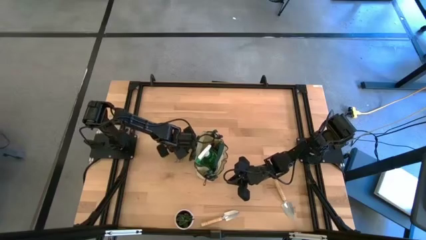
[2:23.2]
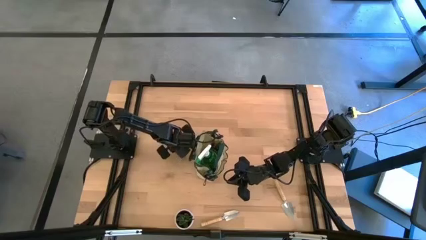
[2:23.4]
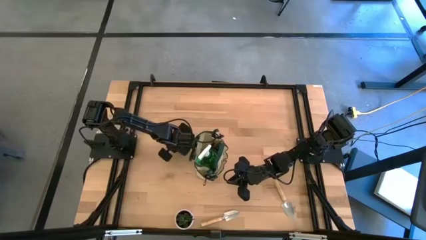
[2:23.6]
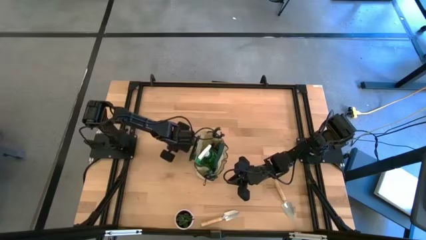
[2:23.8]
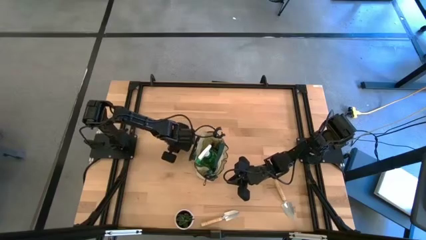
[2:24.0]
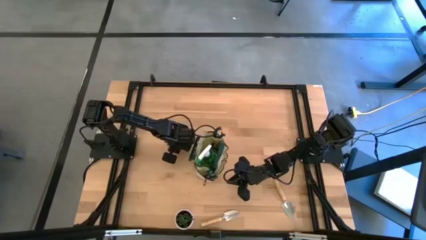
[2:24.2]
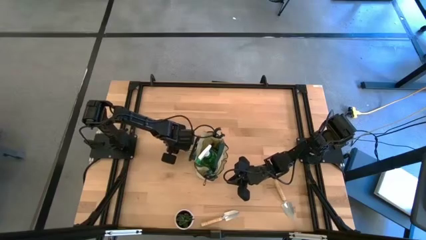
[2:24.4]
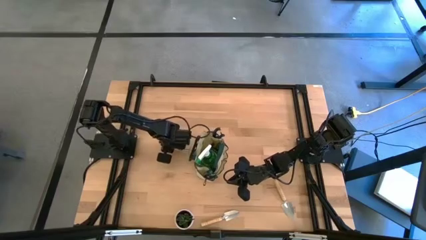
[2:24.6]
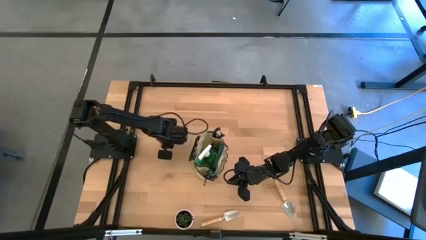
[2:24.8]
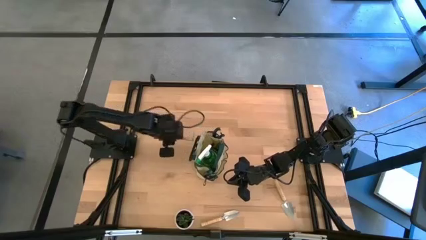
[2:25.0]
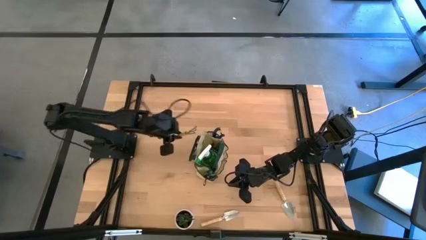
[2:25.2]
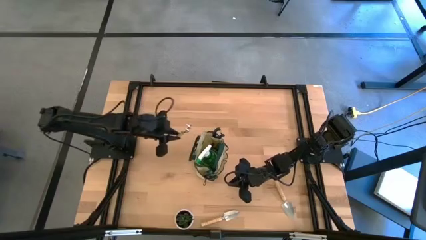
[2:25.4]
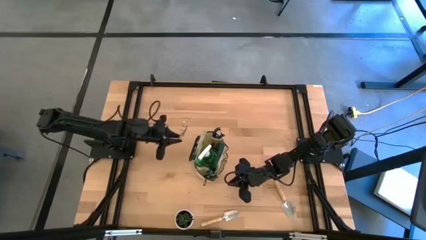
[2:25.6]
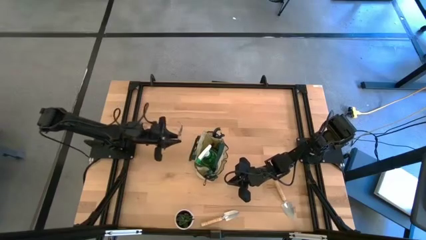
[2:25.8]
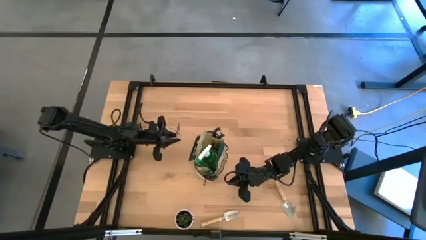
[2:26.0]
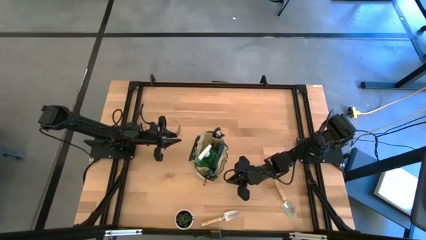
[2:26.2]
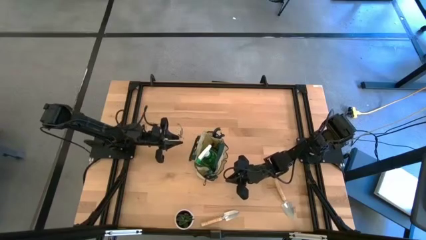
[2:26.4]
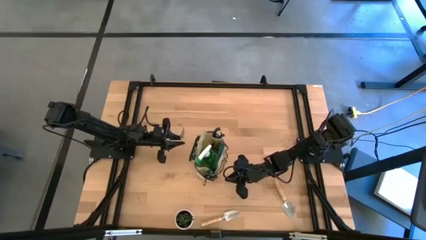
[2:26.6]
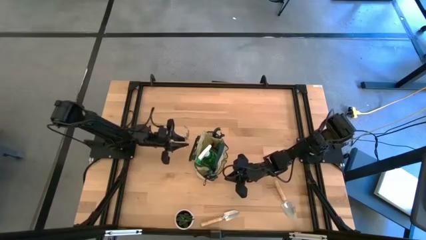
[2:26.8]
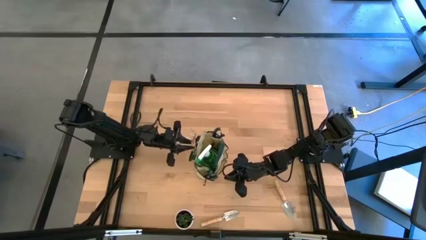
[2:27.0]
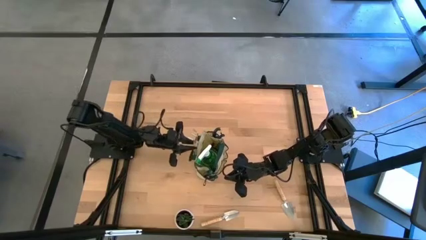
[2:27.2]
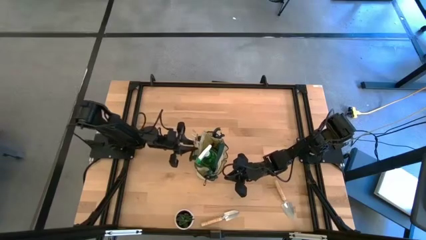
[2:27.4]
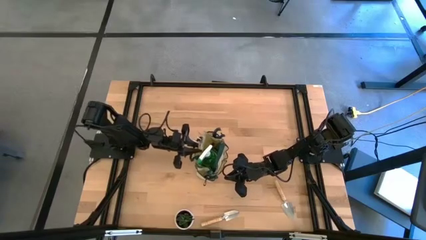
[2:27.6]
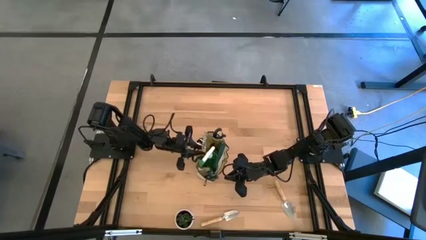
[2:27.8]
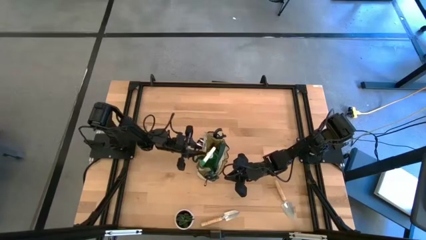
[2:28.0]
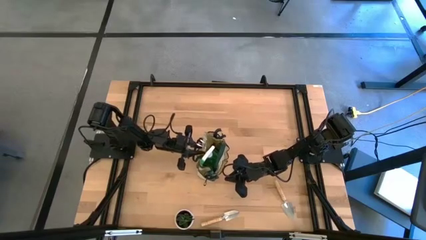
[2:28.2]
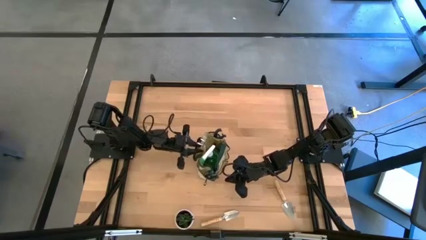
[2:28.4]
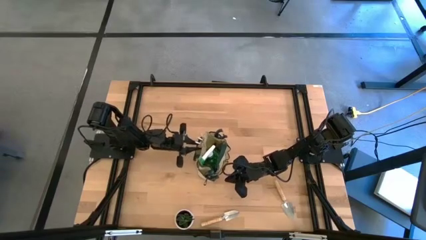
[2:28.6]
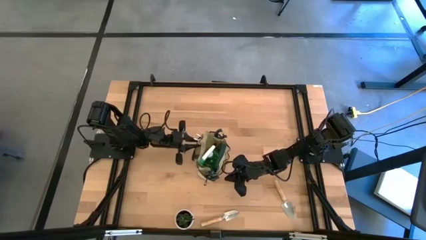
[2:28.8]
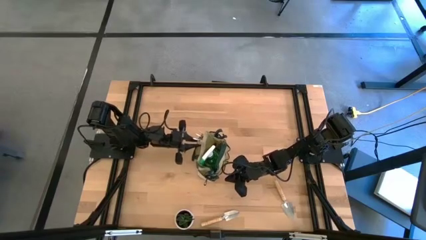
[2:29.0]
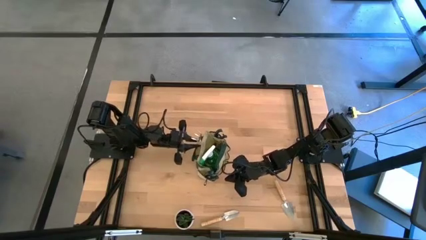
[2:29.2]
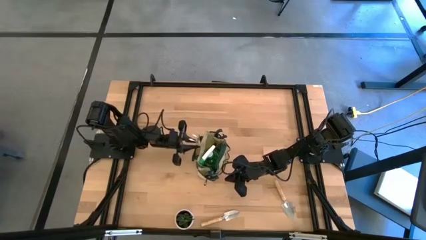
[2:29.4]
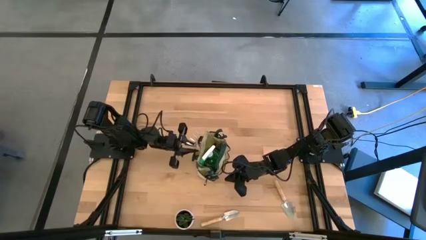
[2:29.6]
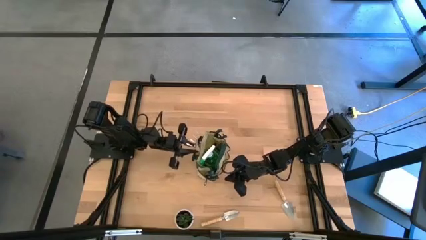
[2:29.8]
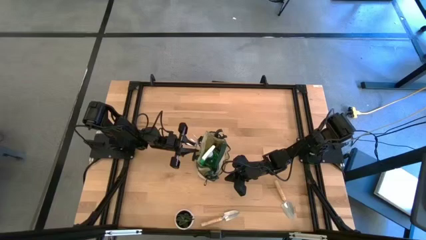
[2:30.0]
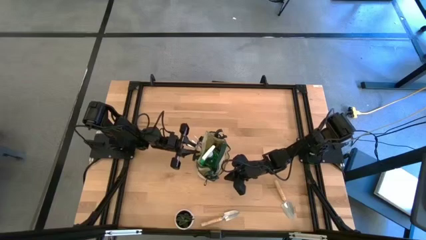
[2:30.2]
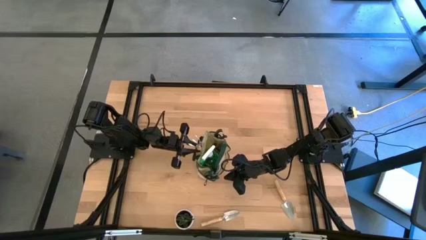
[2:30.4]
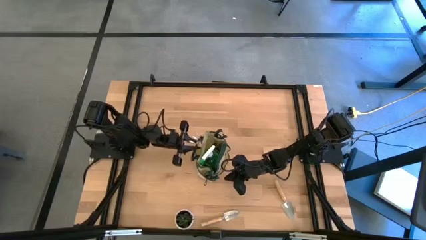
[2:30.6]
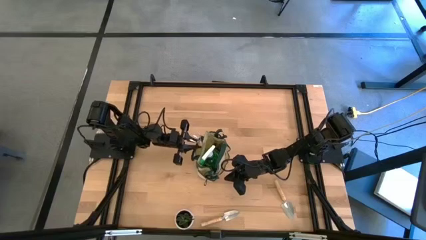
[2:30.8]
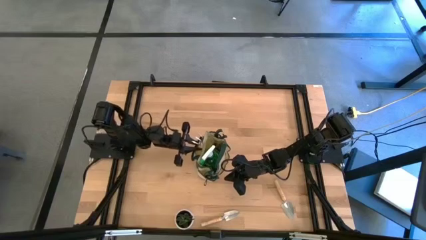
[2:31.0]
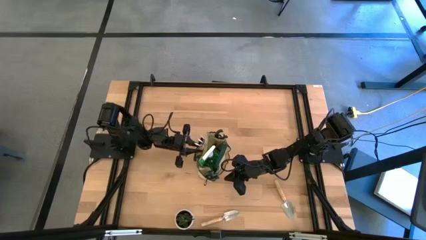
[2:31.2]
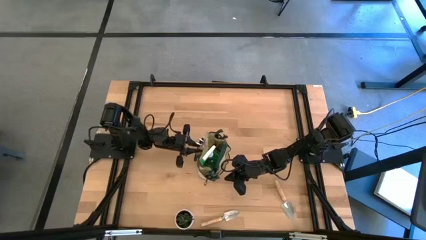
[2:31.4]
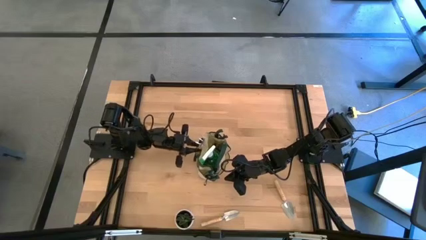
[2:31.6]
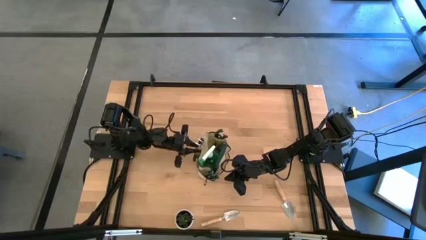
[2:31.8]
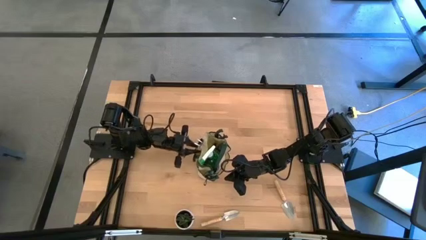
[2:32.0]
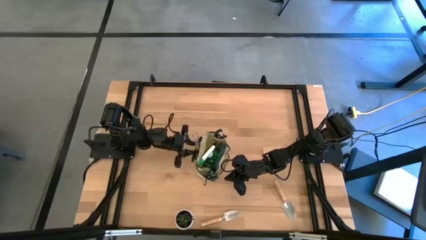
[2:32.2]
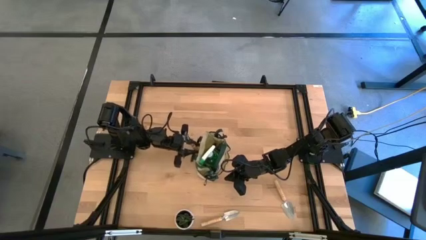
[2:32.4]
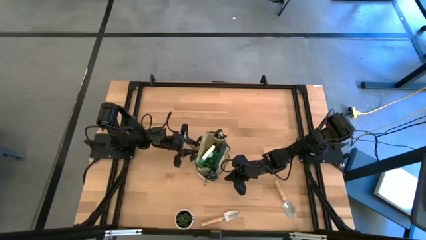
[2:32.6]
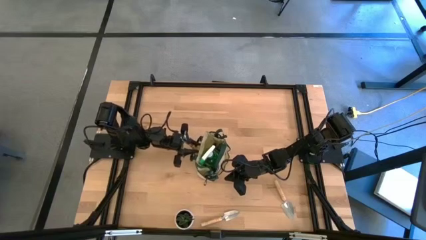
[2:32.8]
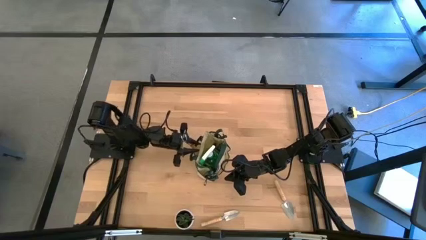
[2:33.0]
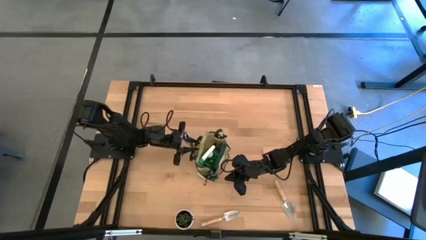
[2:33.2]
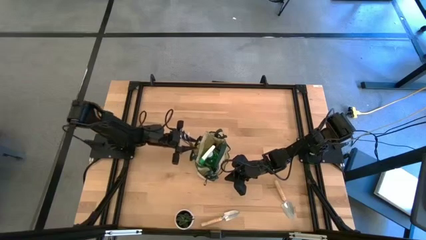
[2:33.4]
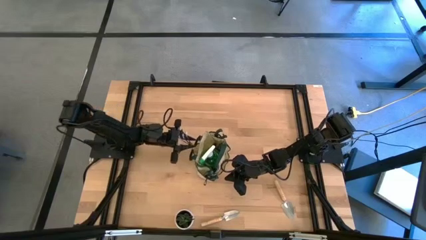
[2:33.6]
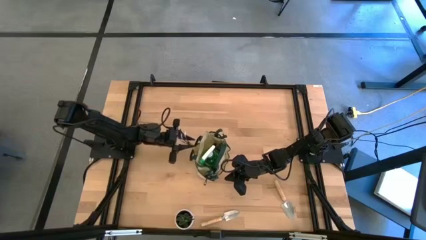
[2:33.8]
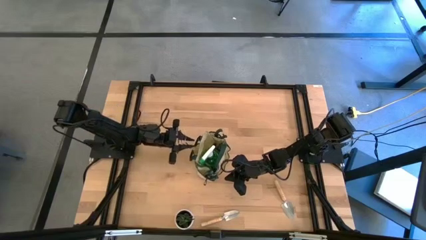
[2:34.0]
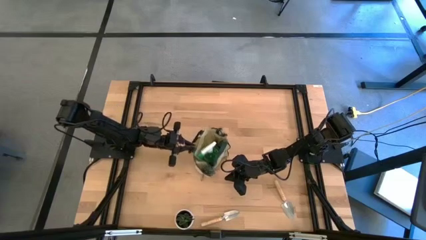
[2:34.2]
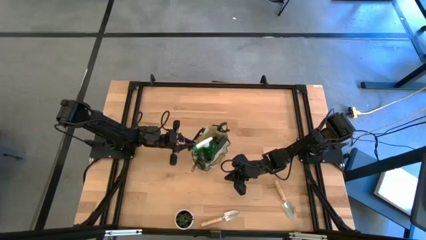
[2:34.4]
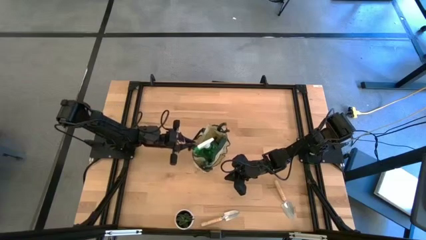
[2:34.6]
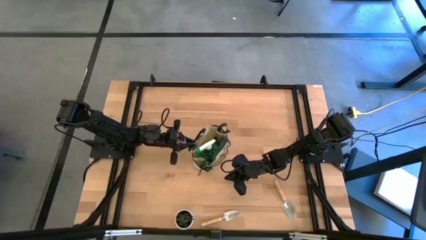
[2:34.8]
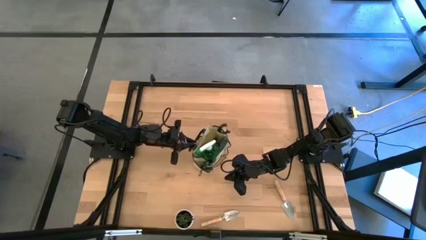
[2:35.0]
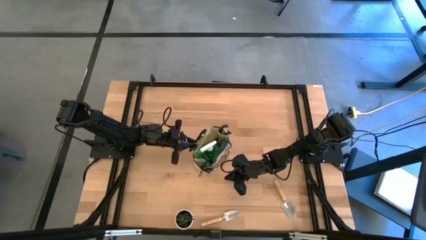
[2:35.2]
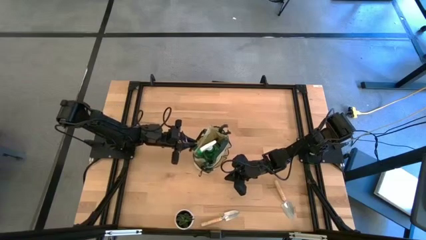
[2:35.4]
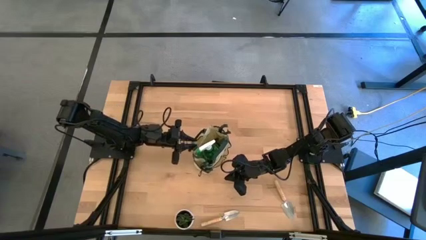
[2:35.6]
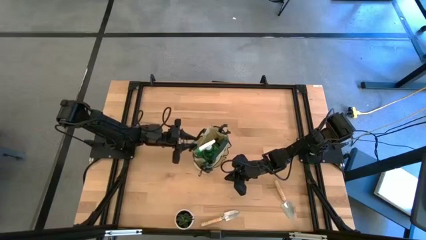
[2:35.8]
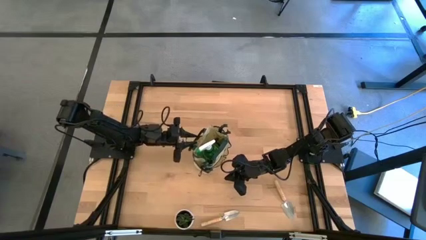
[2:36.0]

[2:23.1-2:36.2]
Task: Pick & Place Garden tools in Gardening bag
Put the brown hand rake into the side pocket of the green gardening bag

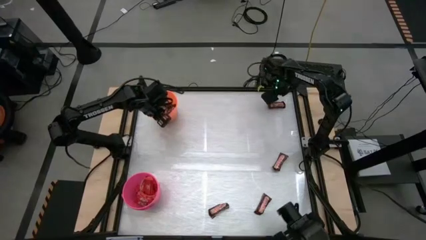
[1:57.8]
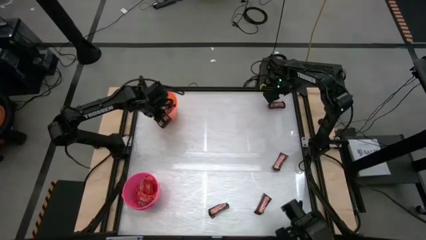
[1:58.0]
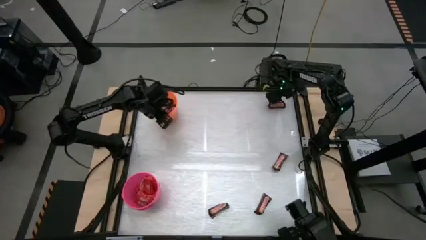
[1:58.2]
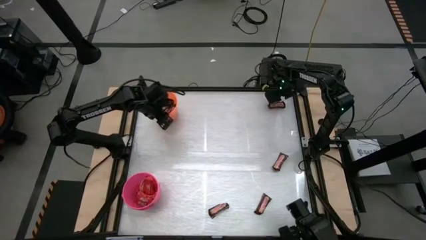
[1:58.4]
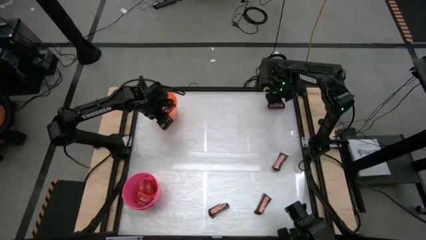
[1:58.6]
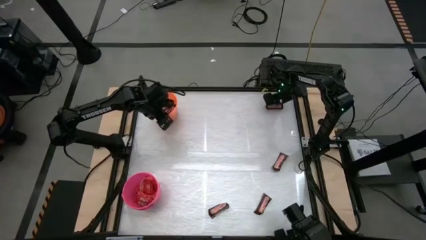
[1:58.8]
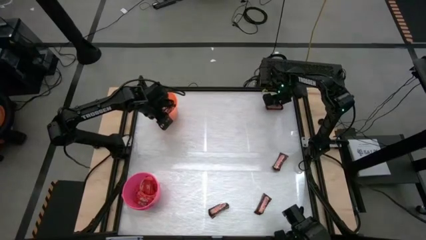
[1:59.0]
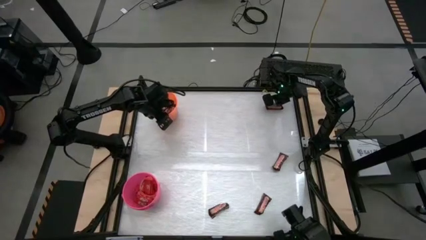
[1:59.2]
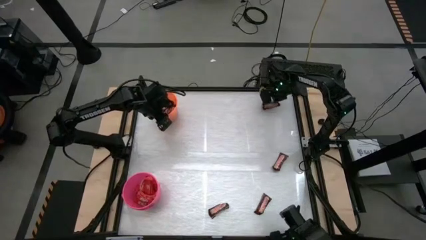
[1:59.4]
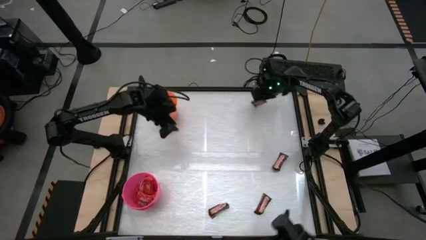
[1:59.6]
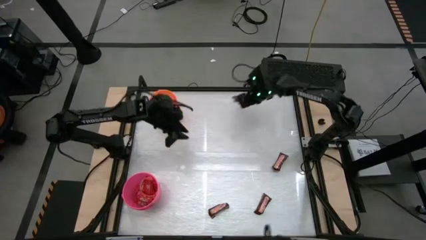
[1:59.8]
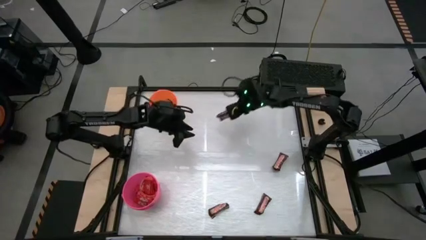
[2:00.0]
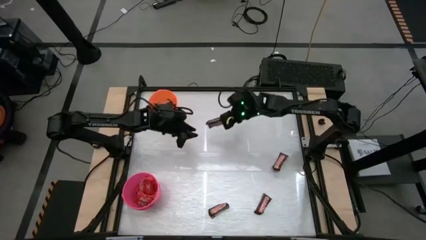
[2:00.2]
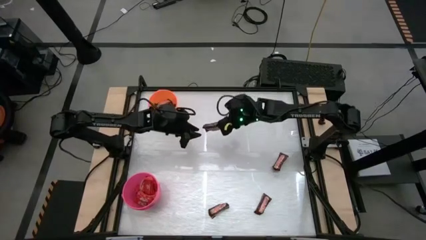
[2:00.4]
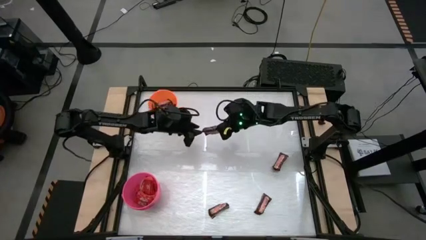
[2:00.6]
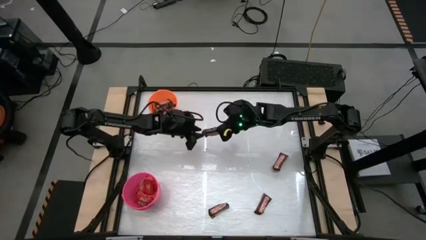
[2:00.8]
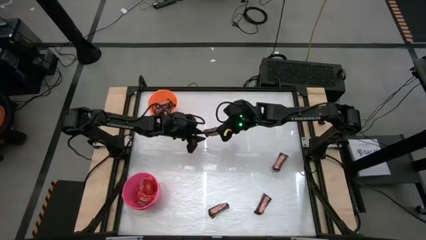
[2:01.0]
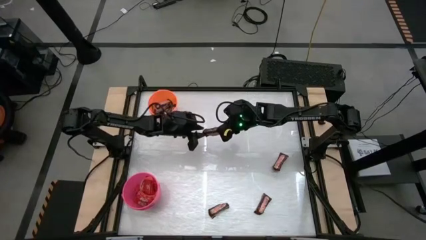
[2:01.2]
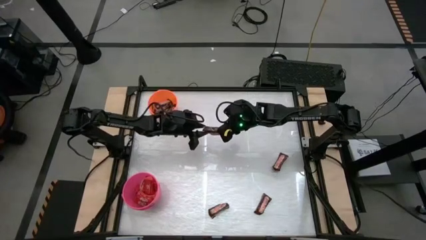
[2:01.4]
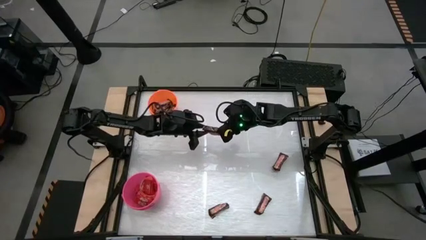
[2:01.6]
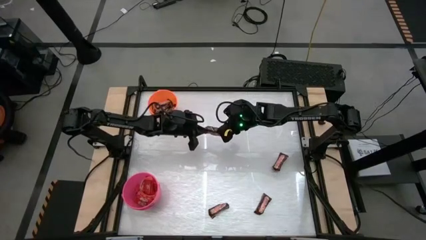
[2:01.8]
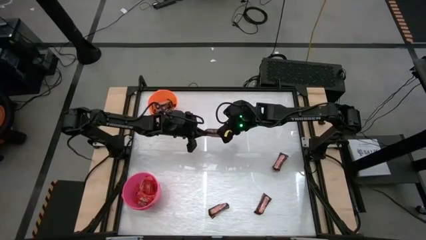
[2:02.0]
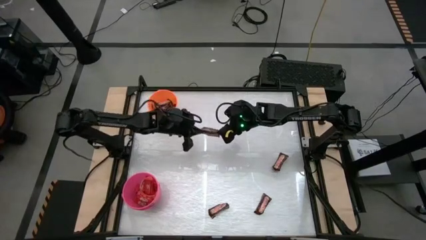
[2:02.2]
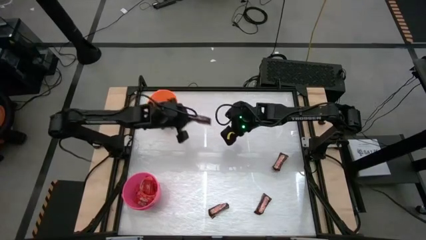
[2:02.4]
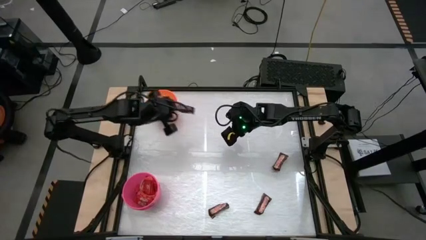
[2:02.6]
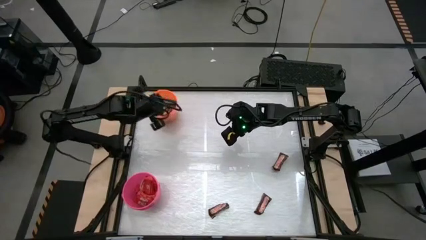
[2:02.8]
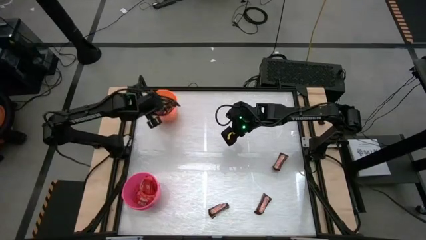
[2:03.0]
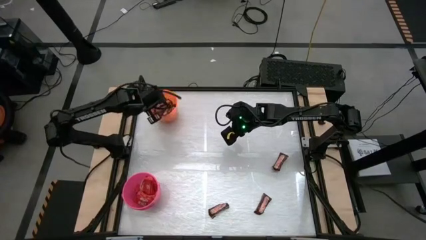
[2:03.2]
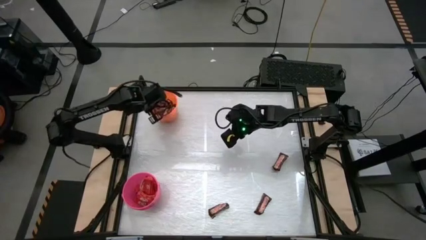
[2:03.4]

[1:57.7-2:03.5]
Task: Sort candy by brand, put in halloween buckets
Put the brown chocolate bar into the orange bucket
